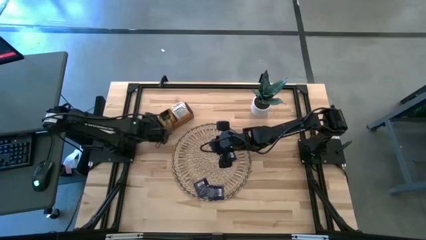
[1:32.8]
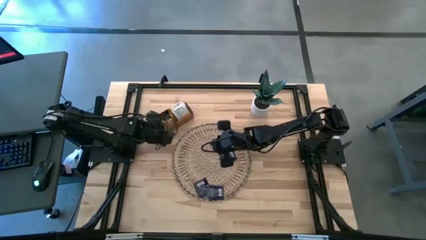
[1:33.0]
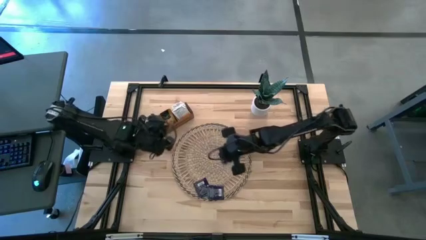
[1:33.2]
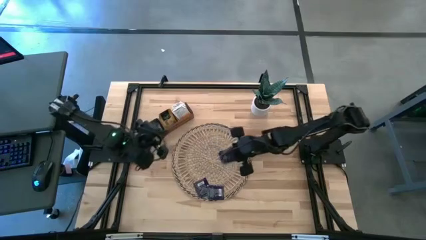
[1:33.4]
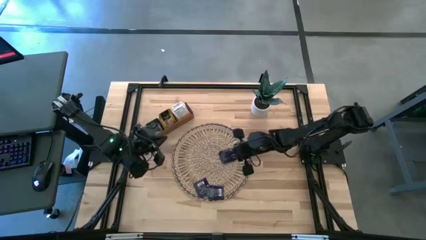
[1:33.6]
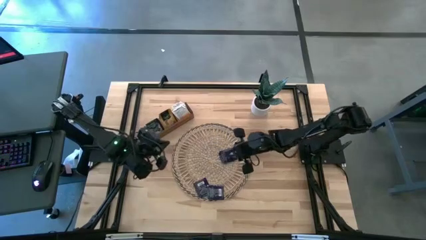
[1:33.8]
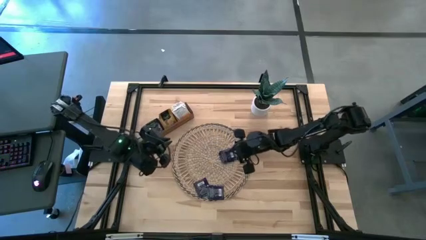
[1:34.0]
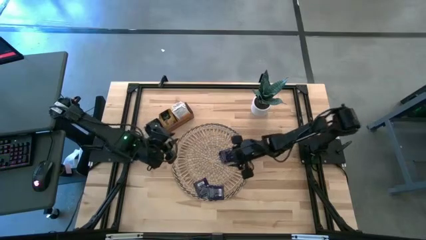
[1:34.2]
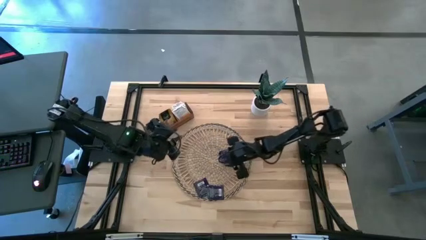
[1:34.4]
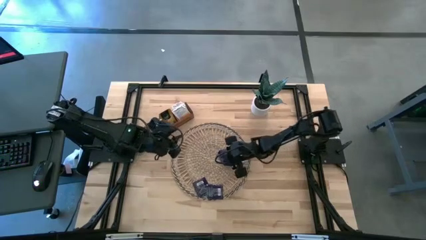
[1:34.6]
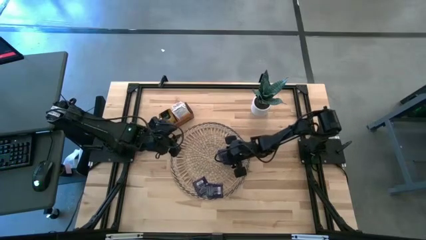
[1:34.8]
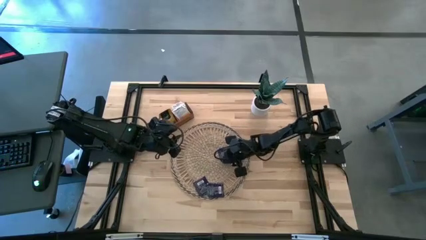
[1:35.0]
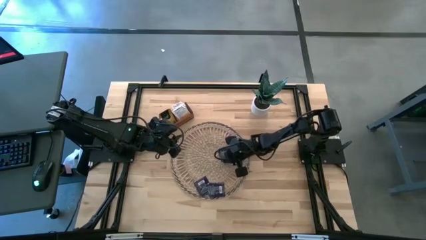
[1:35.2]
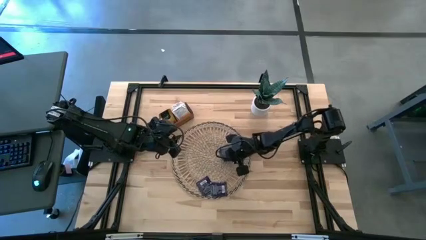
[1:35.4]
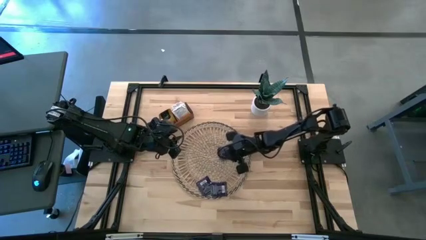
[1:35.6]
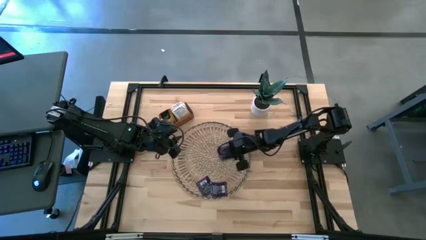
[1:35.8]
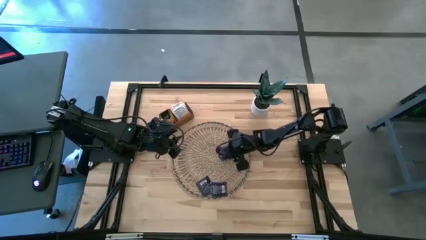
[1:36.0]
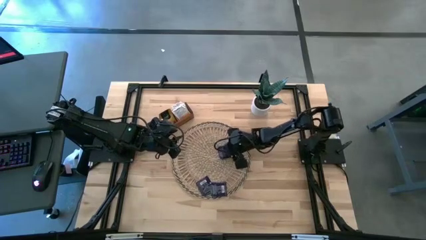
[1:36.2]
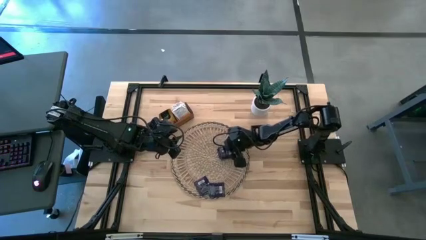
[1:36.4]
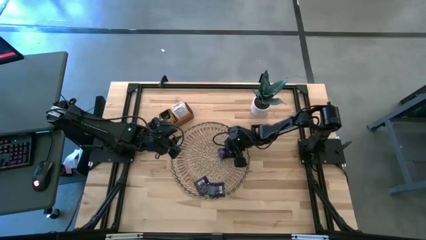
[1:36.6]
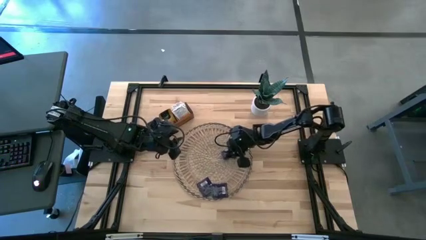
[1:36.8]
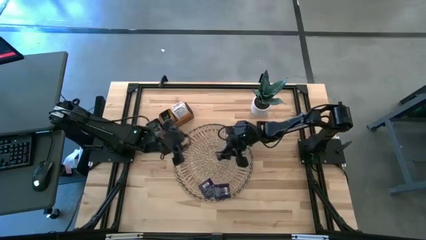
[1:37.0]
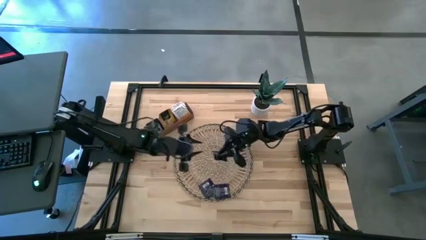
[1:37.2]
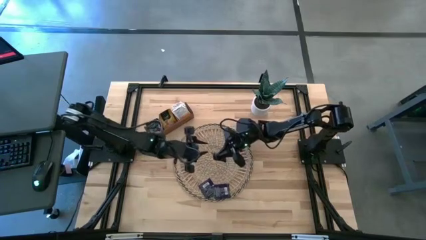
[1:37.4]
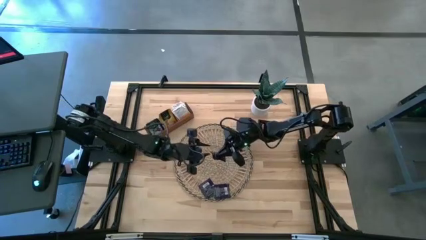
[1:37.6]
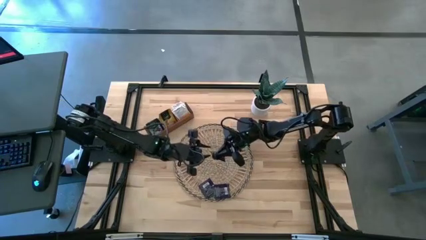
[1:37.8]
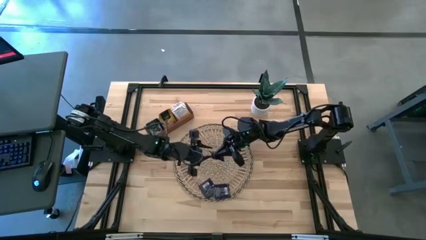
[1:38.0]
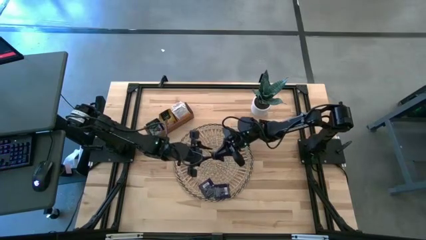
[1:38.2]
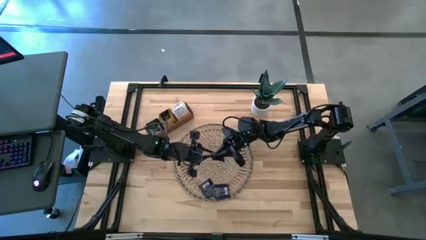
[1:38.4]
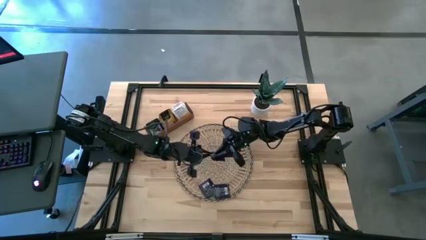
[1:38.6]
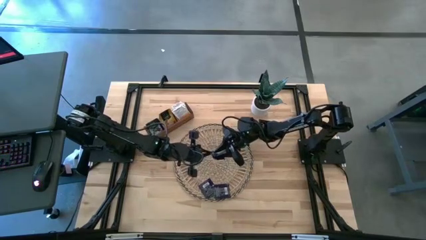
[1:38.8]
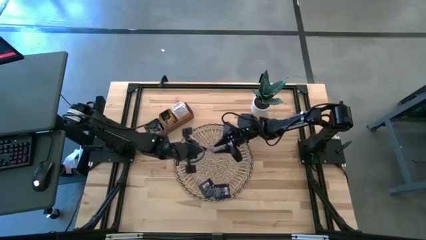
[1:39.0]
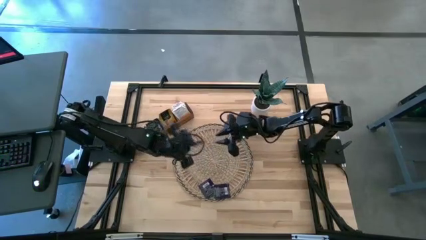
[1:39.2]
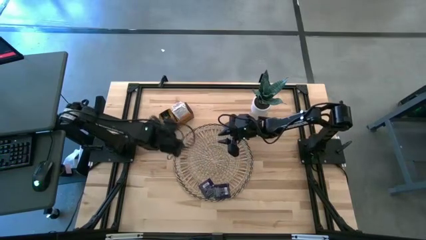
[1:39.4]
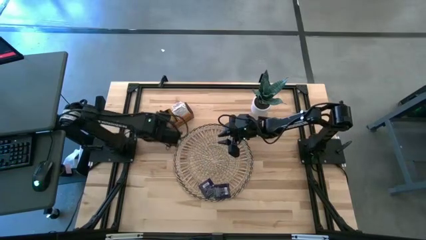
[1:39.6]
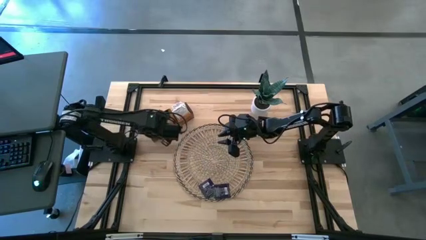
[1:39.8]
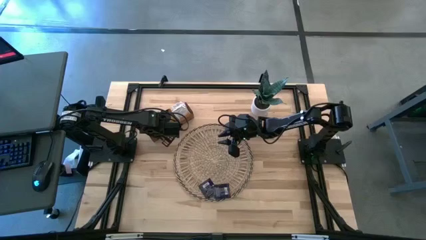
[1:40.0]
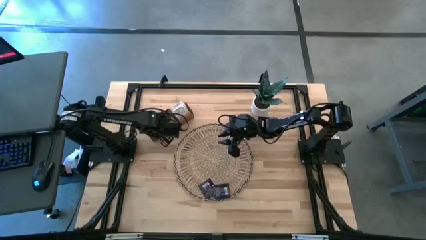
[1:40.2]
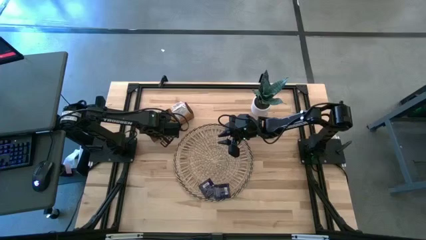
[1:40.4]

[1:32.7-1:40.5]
Task: Pick & Place Tea
Put the top right black tea bag into the left compartment of the wooden organizer

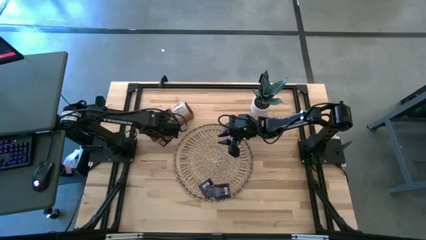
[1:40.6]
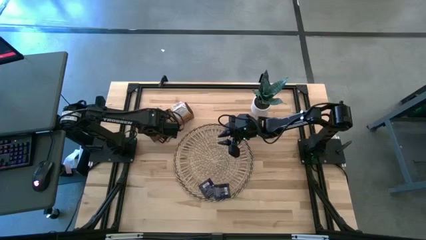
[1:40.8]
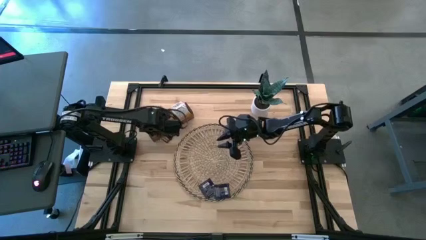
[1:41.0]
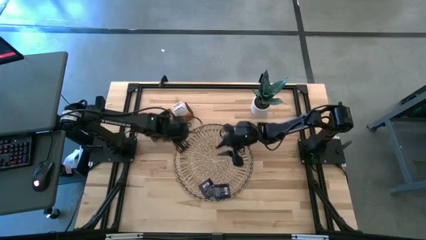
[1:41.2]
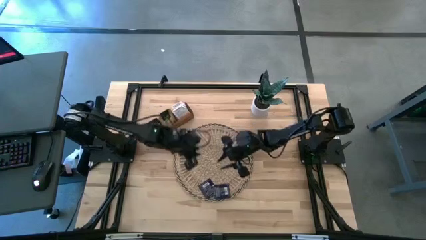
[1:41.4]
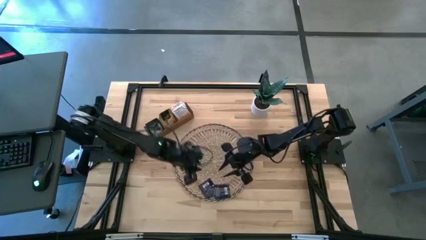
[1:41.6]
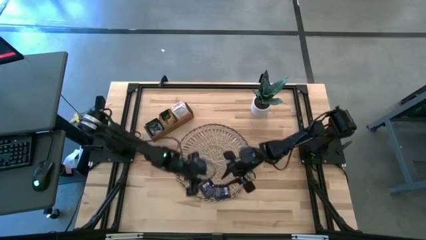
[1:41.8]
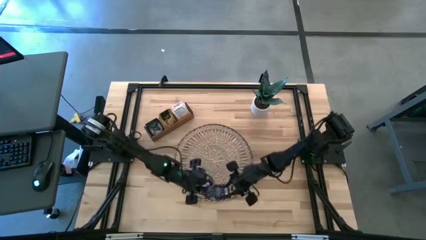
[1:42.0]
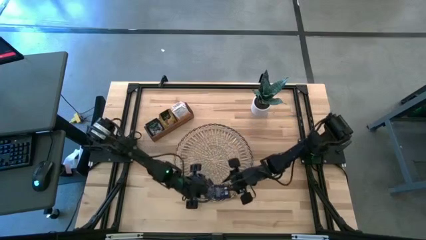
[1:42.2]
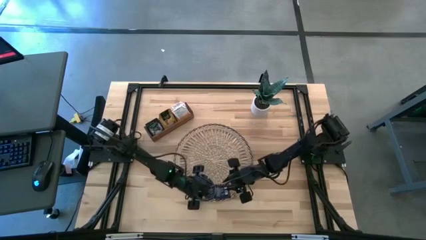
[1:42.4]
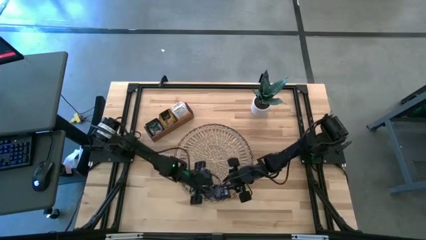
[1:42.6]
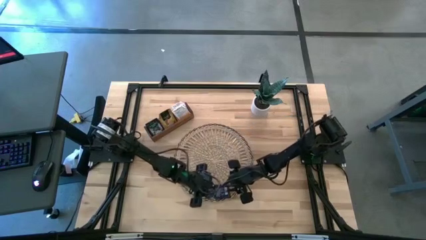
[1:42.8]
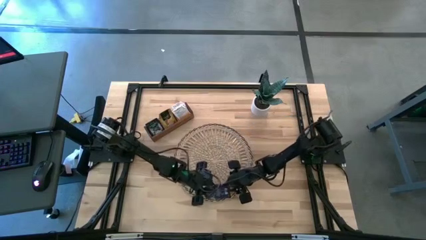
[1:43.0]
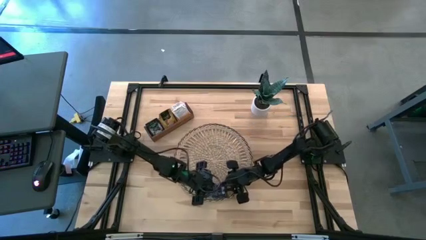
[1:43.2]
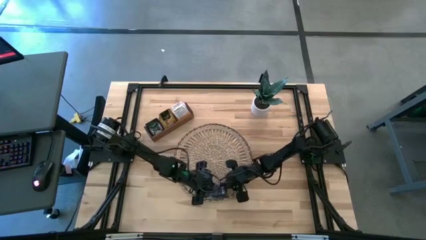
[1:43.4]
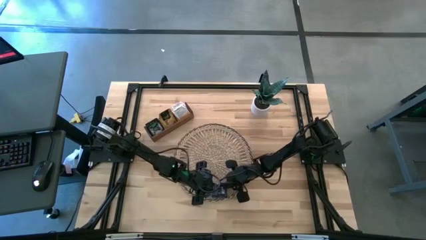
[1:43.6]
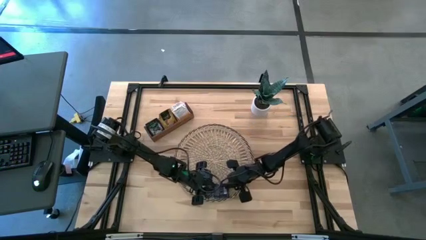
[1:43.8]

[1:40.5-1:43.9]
Put the right black tea bag into the left compartment of the wooden organizer

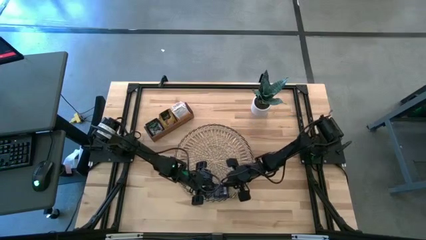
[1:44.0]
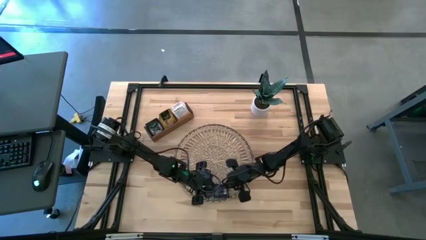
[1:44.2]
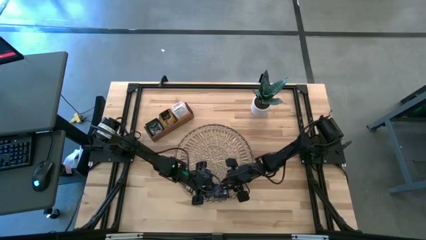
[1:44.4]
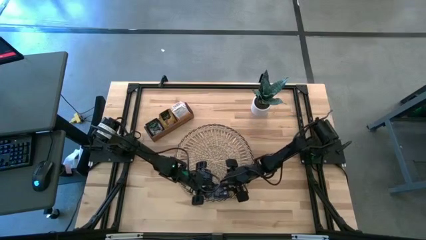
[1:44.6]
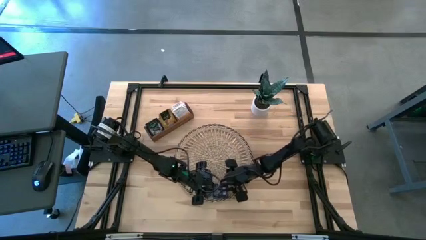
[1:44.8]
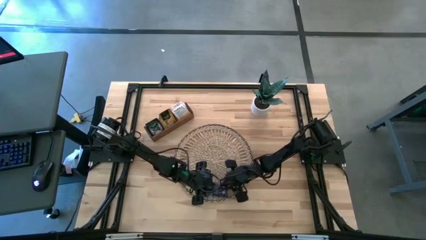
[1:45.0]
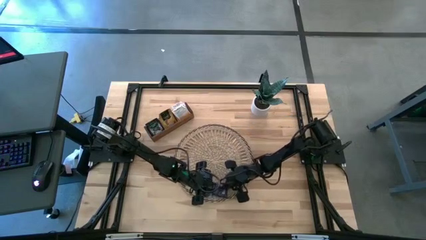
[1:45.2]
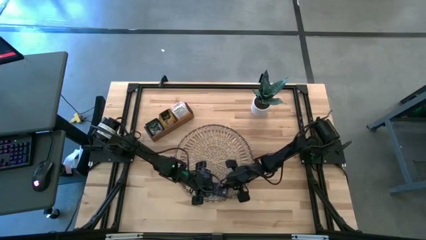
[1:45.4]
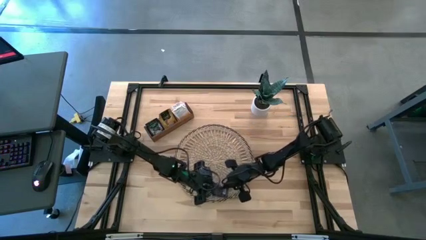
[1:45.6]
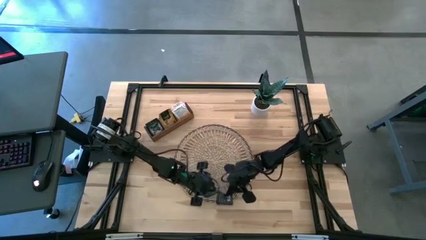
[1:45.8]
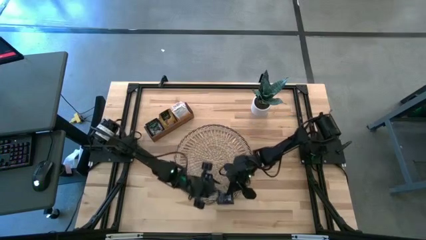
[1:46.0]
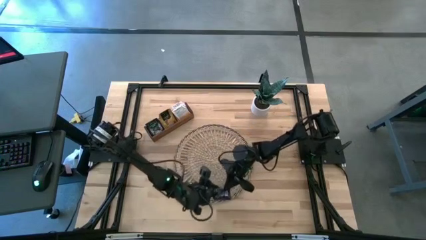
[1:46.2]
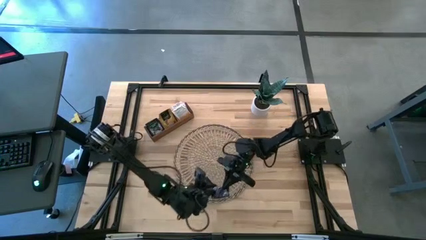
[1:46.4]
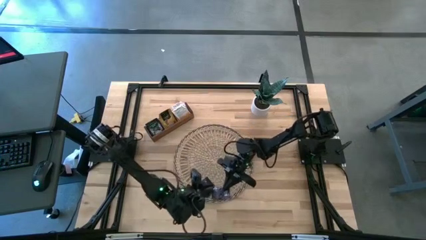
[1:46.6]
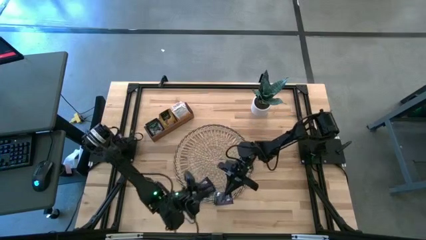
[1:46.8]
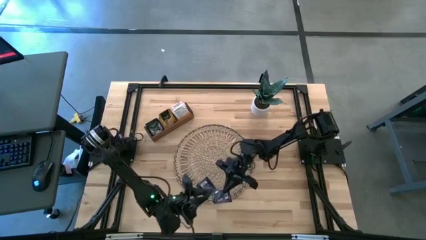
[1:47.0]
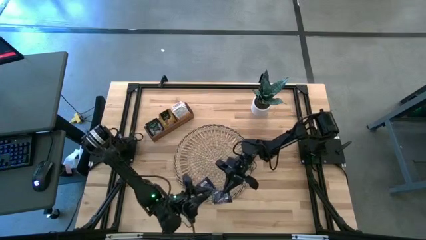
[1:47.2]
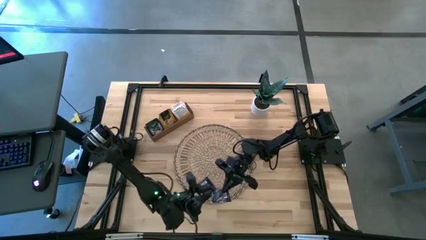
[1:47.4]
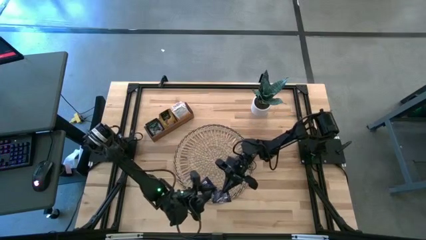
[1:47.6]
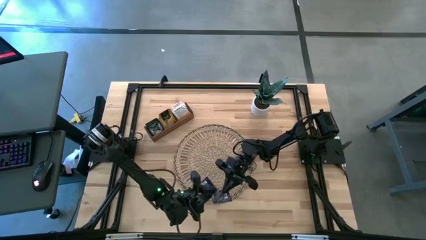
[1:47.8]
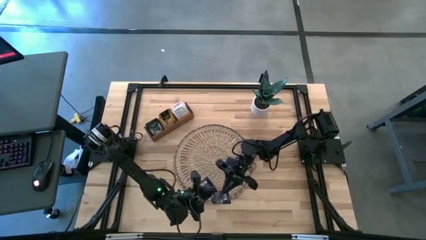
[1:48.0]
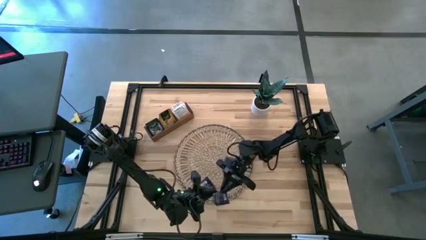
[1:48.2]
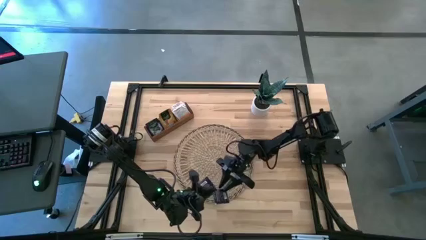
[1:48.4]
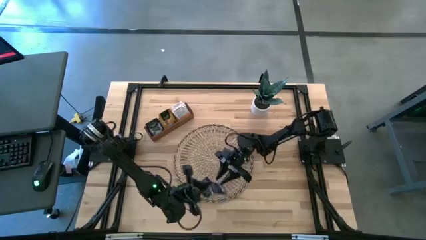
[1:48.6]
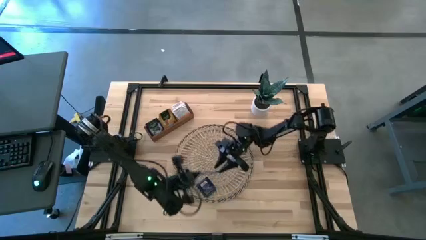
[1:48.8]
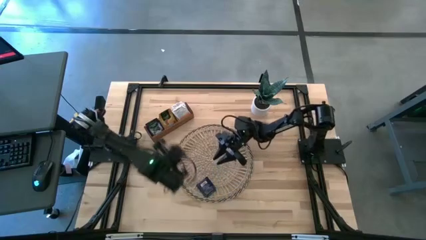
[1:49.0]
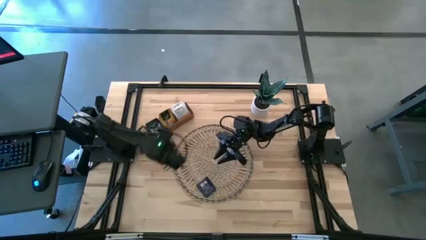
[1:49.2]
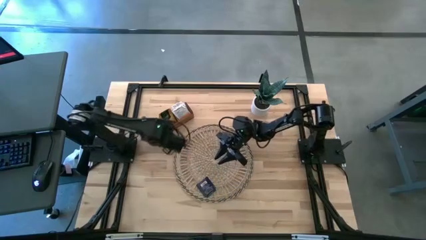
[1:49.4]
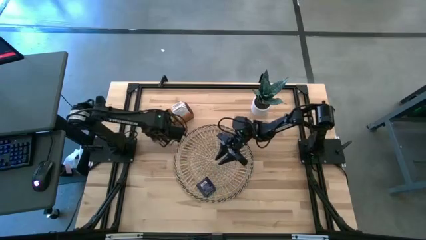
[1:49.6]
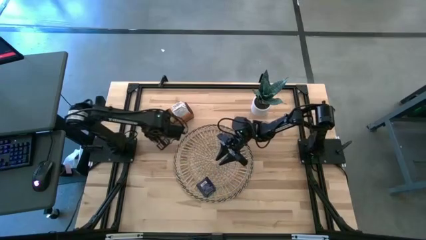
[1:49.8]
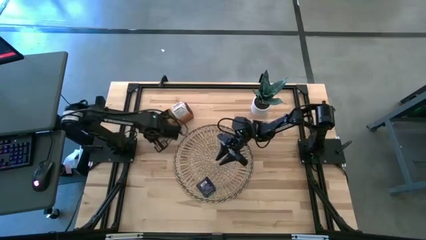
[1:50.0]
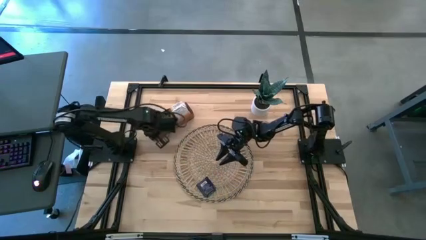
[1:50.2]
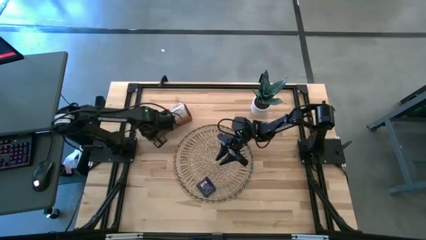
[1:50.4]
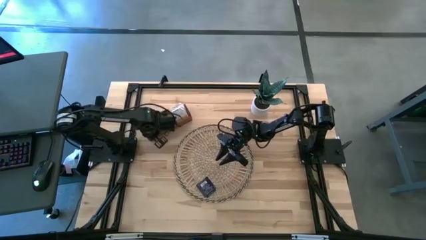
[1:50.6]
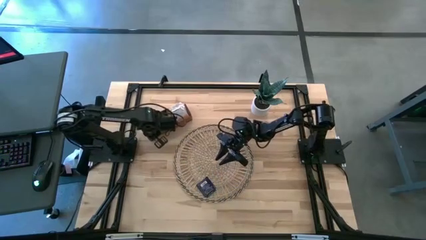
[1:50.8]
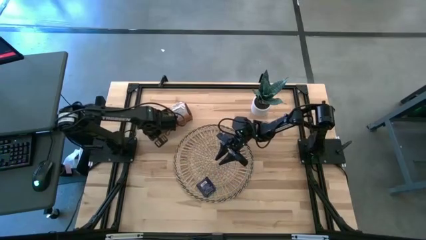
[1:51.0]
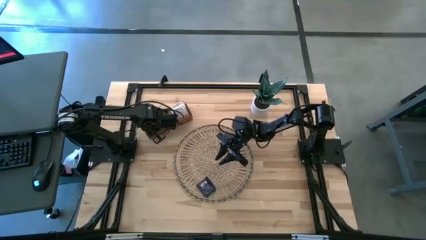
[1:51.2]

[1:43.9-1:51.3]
Put the right black tea bag into the left compartment of the wooden organizer
